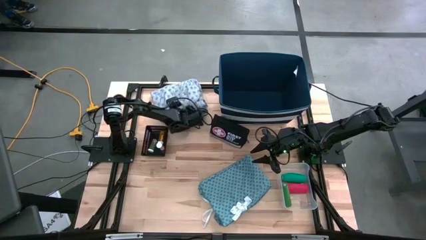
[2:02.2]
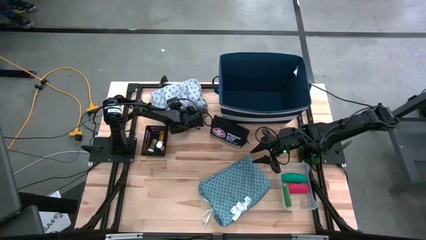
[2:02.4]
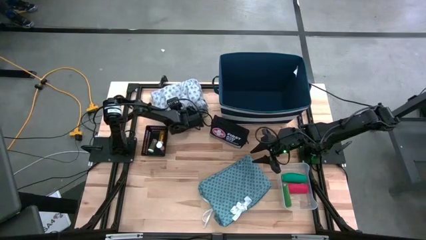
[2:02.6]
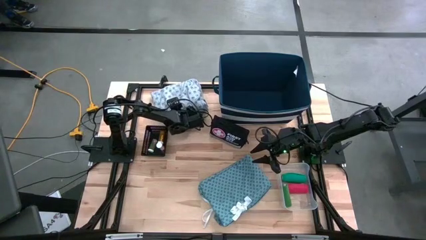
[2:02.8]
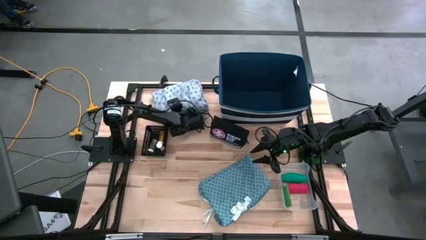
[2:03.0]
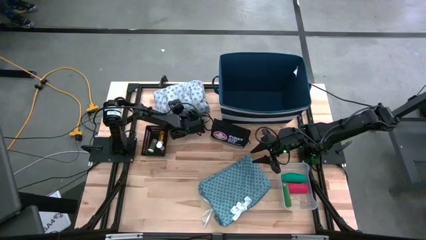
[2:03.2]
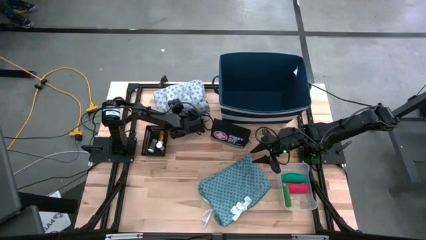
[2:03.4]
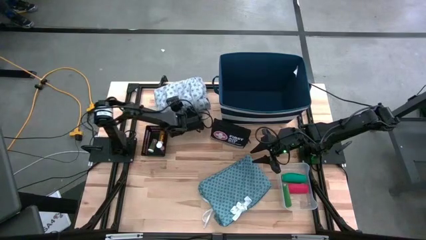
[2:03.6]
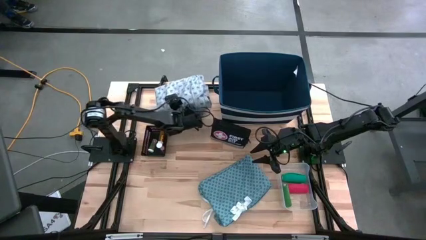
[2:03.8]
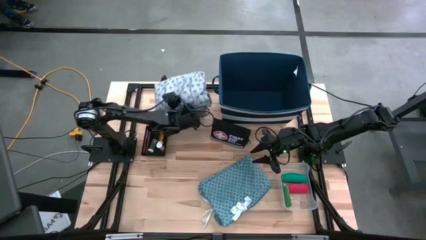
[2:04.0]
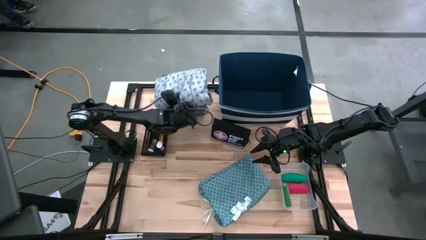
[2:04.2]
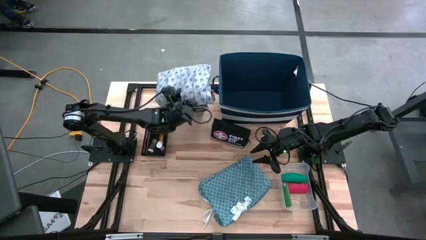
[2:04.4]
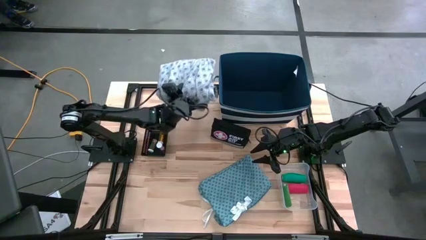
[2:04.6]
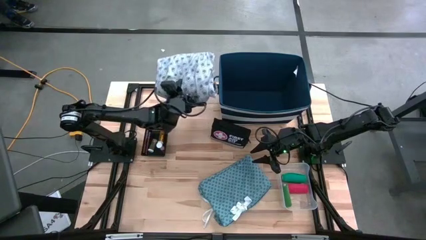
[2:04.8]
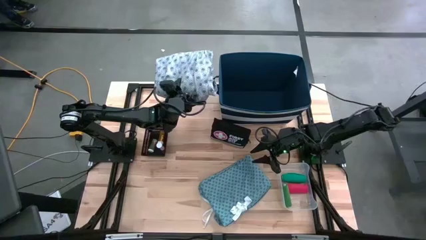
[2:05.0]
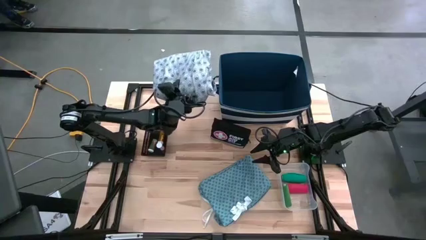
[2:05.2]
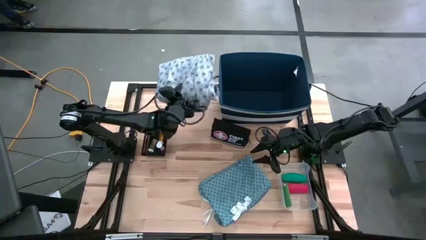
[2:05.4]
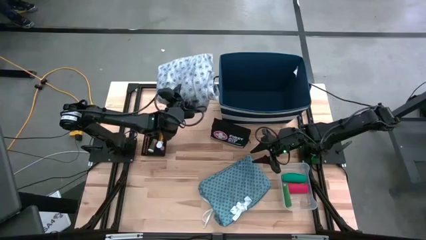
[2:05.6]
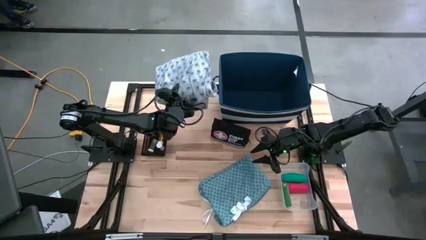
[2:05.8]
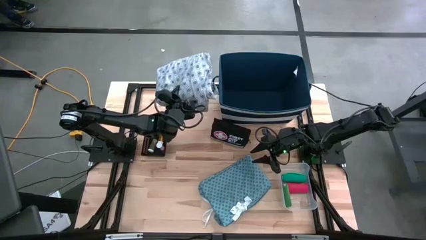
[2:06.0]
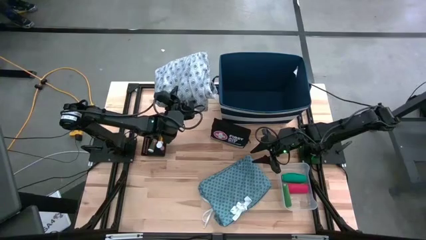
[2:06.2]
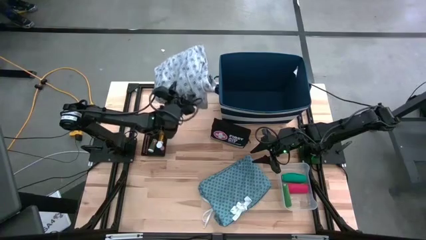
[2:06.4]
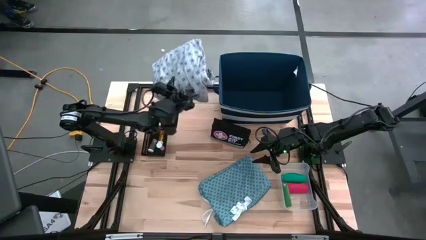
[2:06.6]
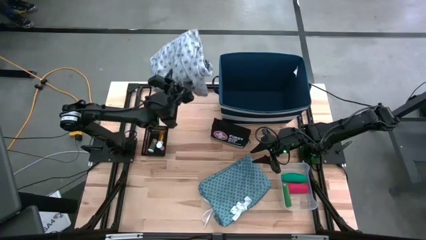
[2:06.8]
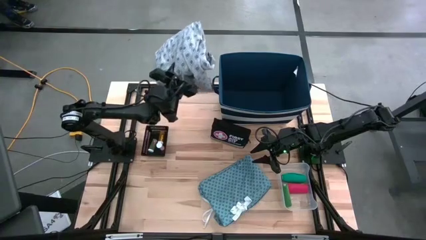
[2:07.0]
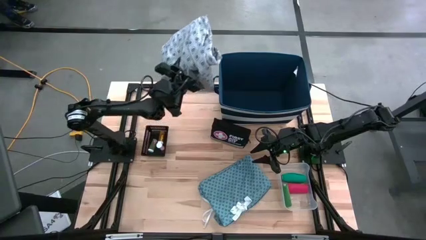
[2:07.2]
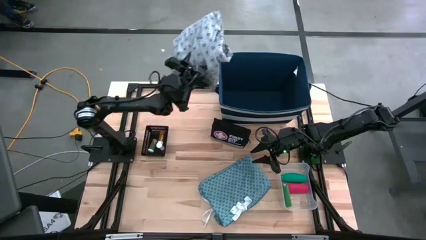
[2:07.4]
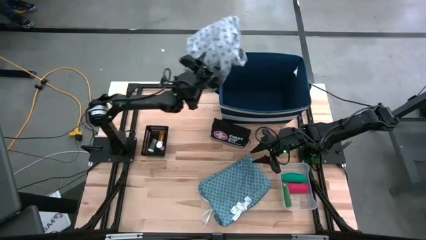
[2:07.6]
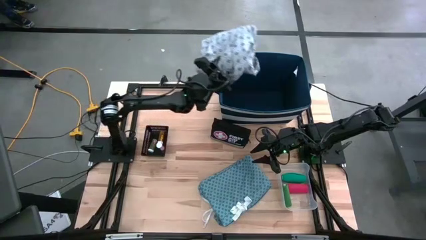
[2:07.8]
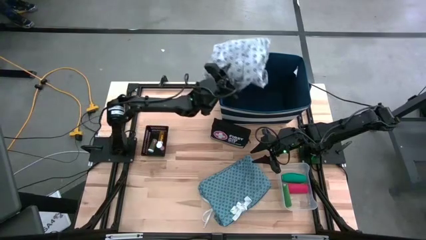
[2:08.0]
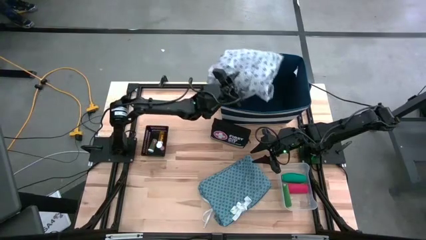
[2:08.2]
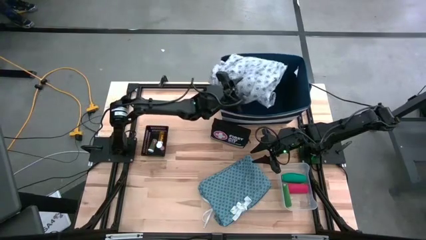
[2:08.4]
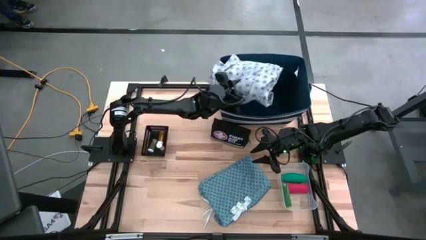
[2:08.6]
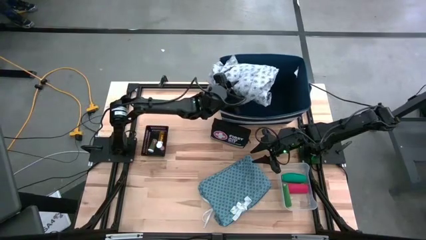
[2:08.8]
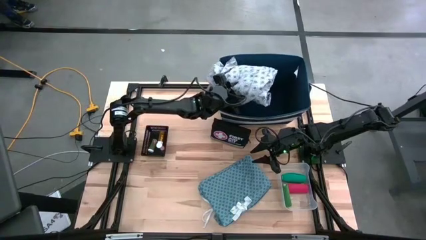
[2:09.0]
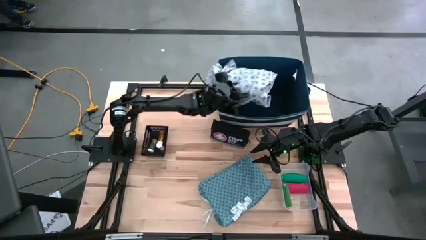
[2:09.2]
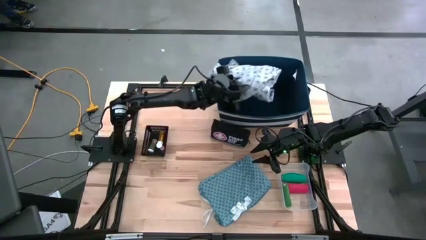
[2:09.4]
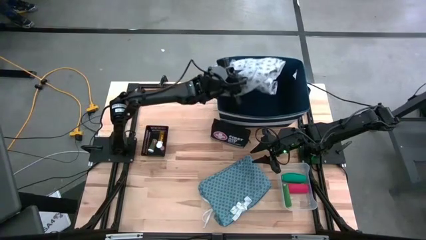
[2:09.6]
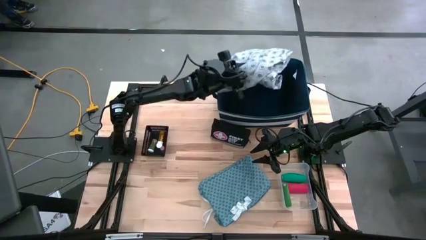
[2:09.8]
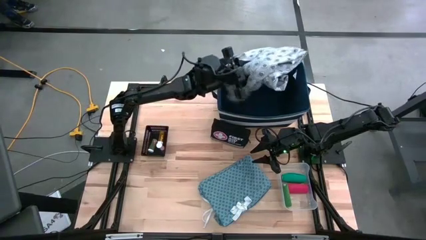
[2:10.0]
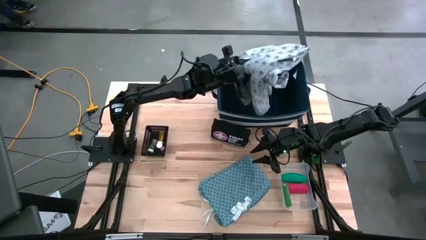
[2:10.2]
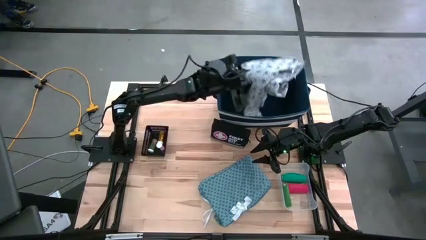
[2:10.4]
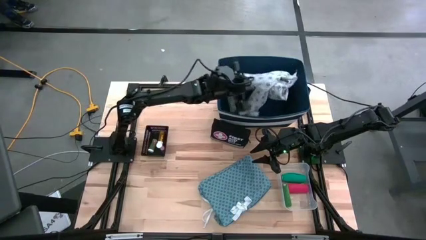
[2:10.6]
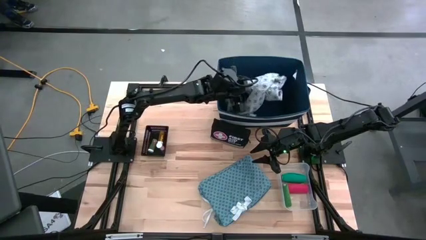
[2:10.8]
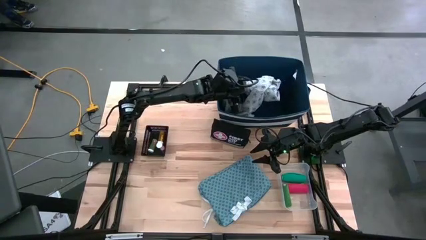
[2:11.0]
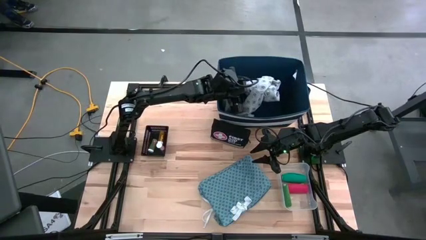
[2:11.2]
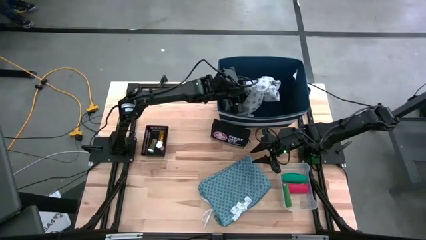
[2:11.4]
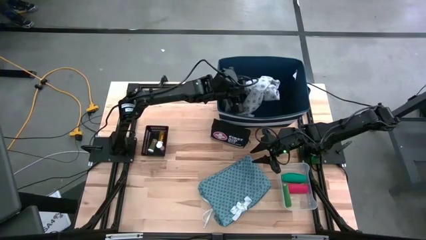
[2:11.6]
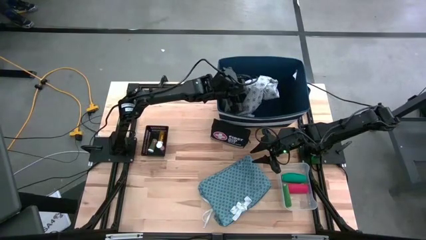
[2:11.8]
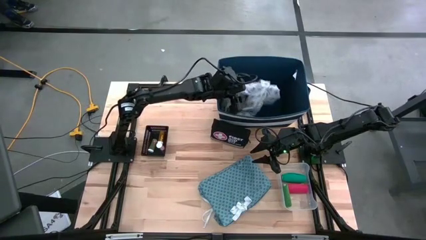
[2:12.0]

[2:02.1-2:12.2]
Task: Pick & place medical supplies in basket/bin
Put the white patient gown into the blue laundry organizer

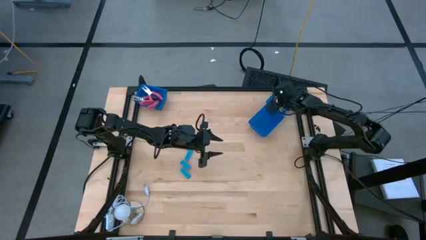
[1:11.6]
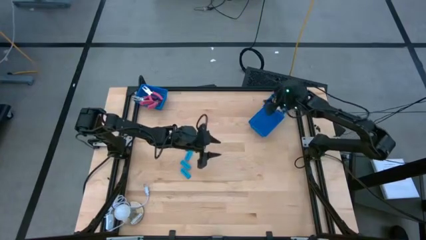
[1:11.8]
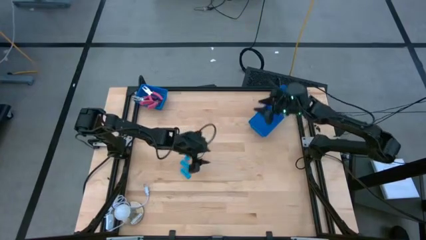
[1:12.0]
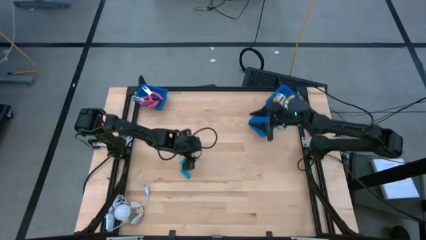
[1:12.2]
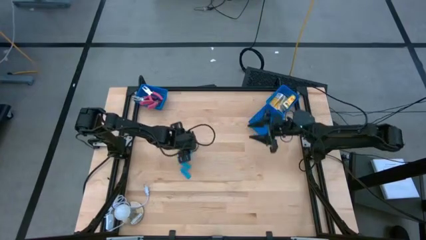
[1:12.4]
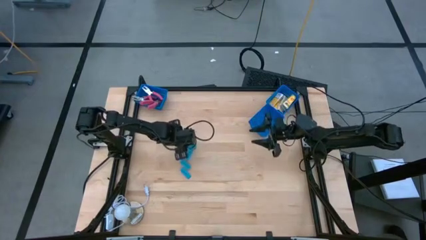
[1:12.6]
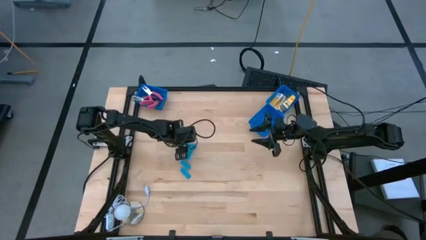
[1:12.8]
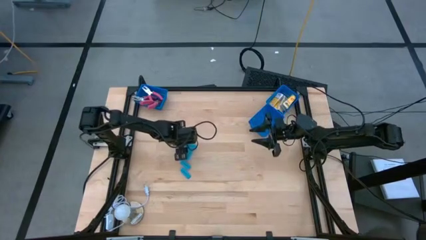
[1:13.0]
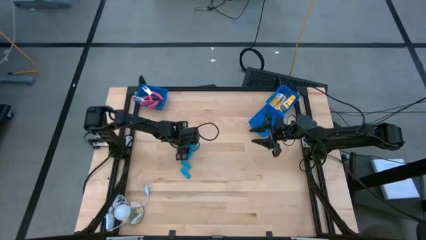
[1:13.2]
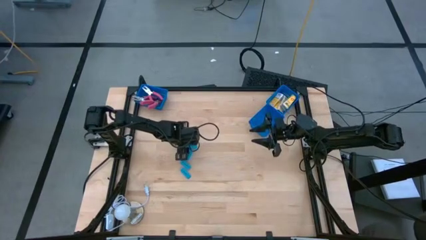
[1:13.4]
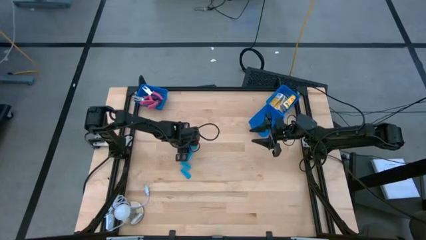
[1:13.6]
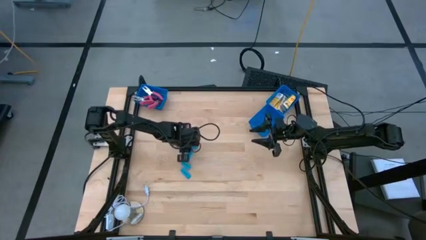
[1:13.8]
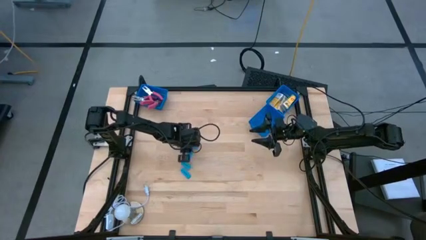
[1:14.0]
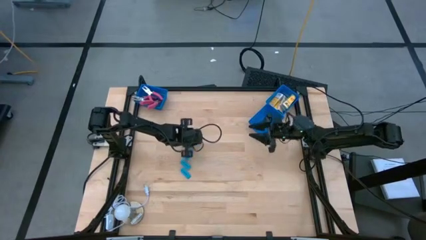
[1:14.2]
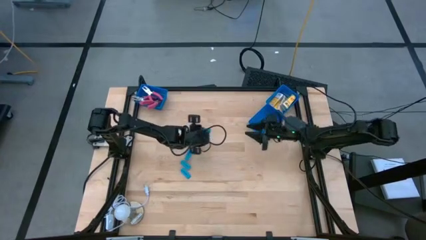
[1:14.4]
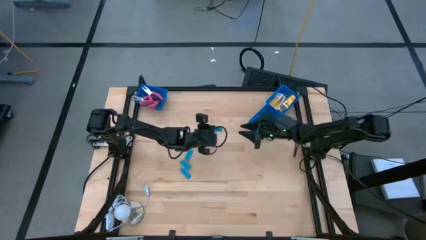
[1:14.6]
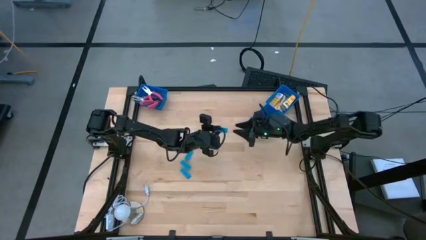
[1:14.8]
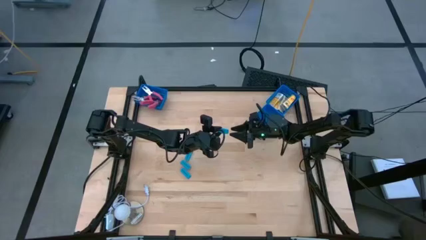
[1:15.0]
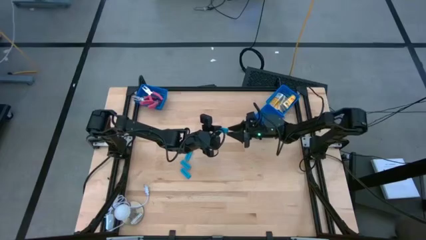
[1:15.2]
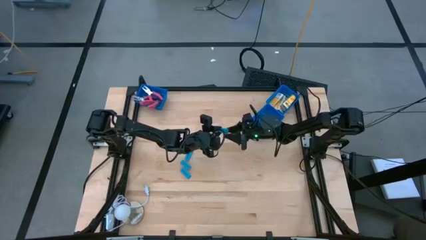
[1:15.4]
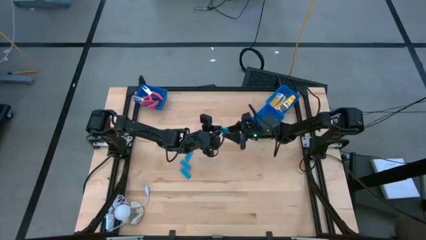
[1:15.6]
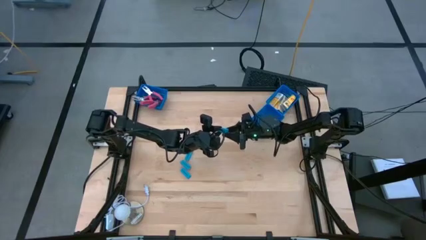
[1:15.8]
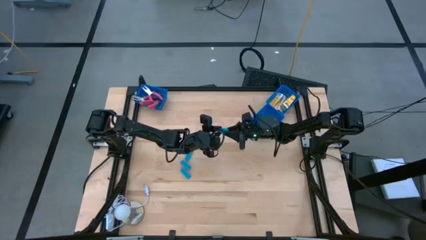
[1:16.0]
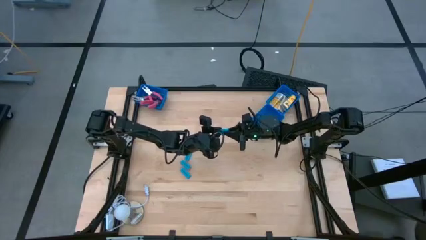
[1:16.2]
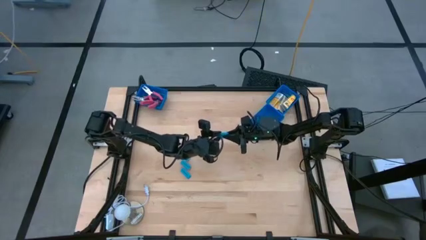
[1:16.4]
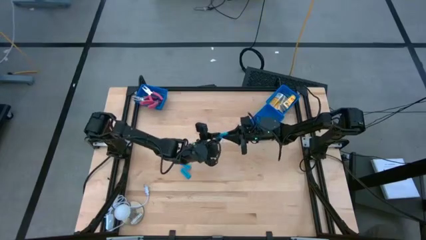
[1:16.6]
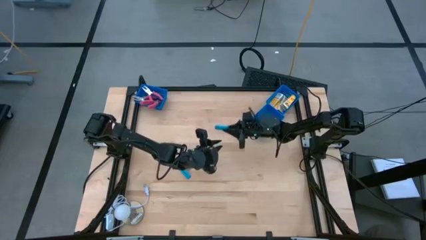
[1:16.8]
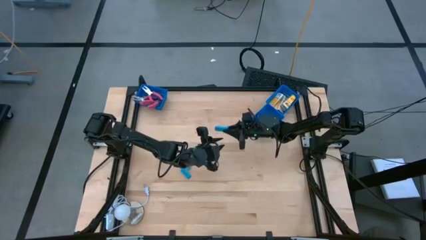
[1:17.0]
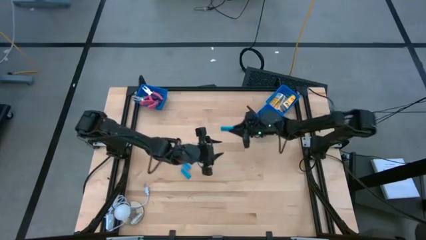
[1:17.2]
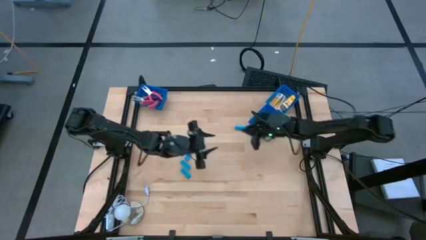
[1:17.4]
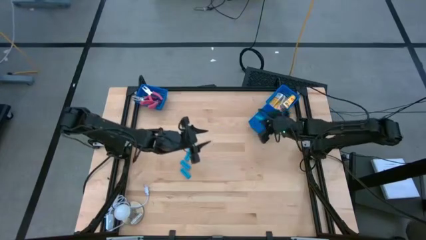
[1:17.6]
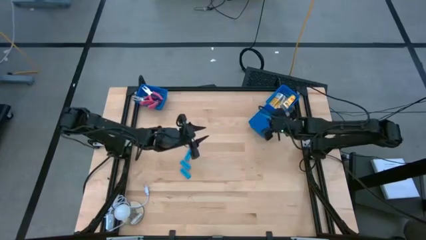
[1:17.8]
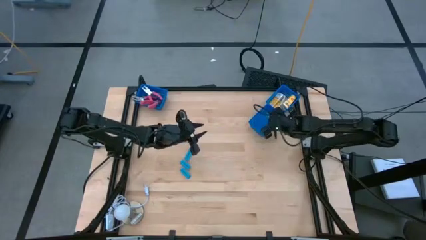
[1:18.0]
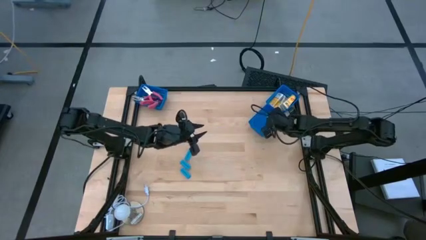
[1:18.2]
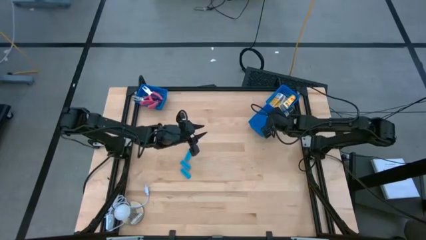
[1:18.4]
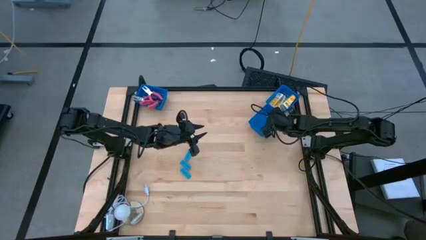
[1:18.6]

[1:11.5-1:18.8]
Task: Pick & Place School Supplies
Put the blue eraser into the bottom right blue basket
